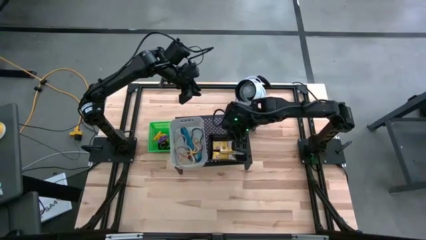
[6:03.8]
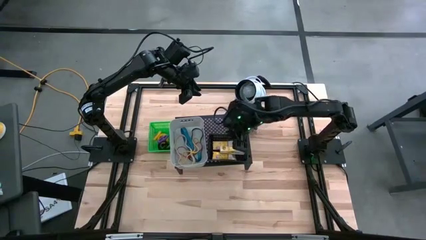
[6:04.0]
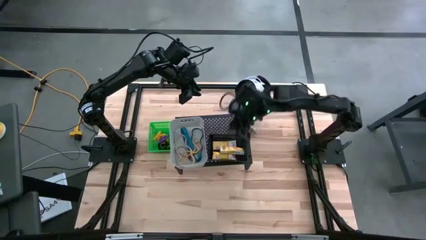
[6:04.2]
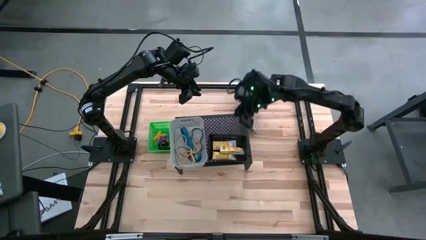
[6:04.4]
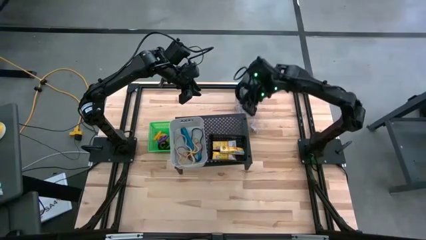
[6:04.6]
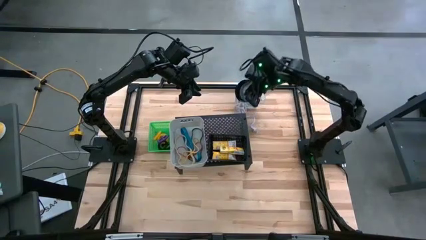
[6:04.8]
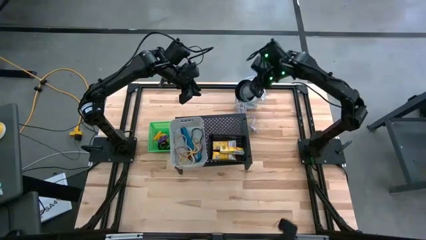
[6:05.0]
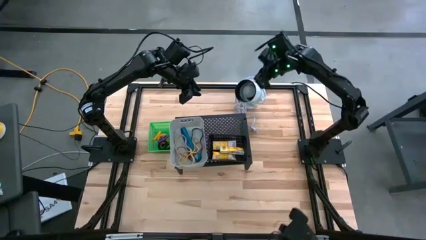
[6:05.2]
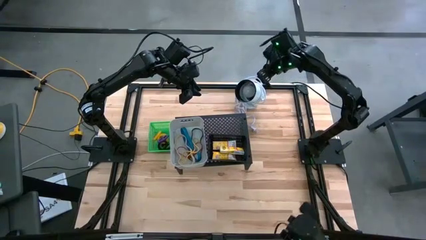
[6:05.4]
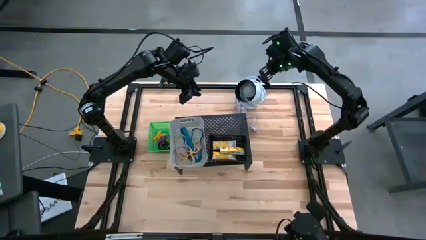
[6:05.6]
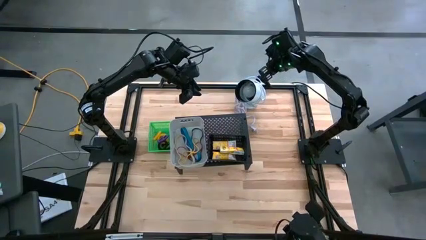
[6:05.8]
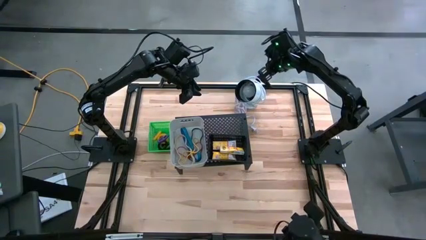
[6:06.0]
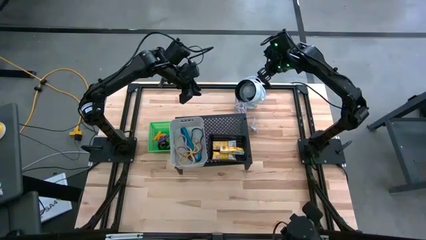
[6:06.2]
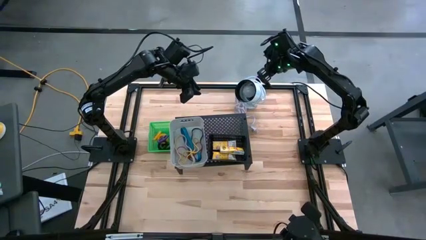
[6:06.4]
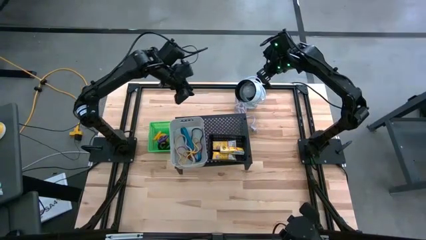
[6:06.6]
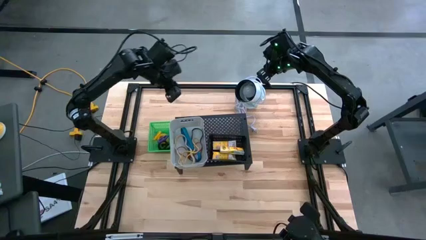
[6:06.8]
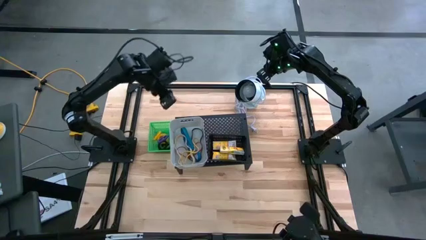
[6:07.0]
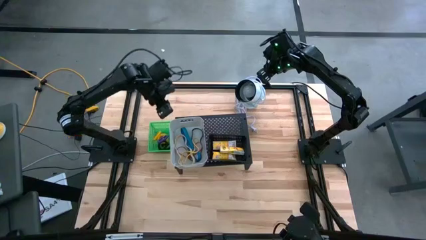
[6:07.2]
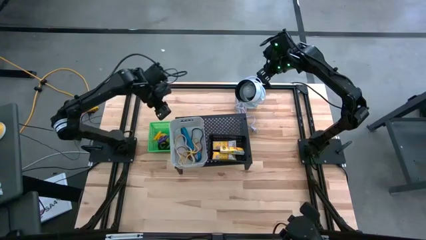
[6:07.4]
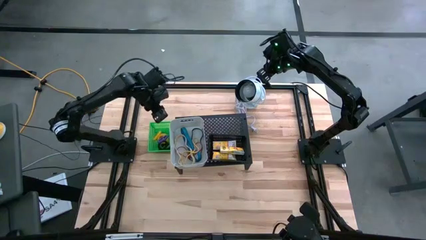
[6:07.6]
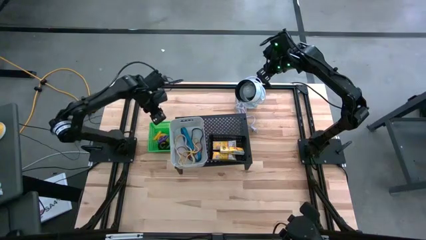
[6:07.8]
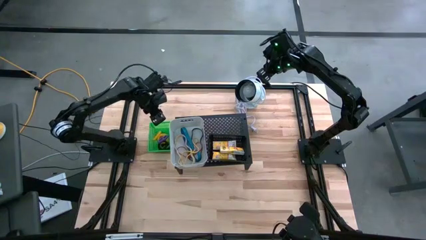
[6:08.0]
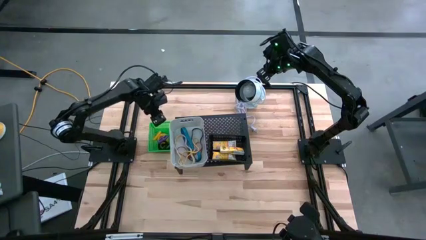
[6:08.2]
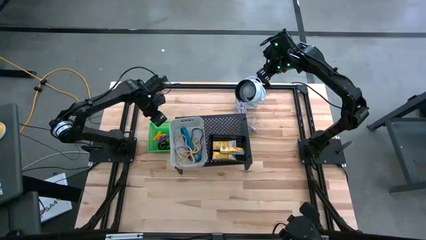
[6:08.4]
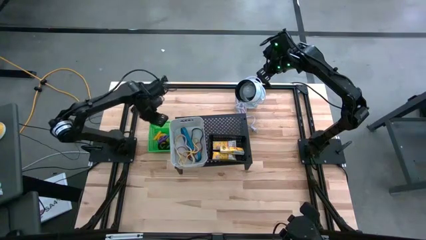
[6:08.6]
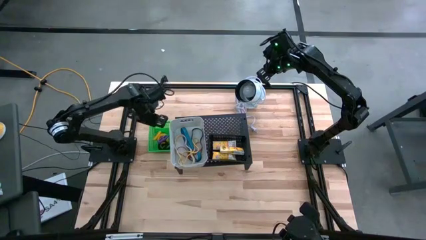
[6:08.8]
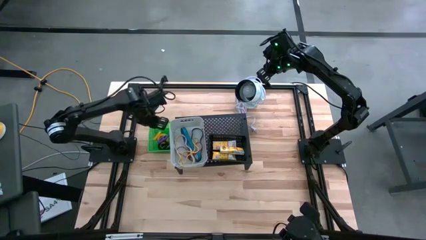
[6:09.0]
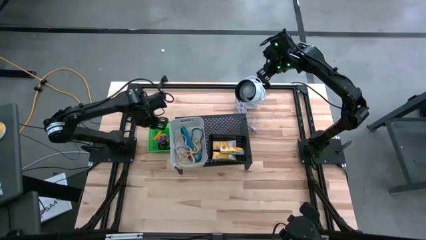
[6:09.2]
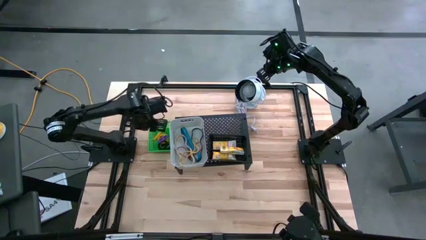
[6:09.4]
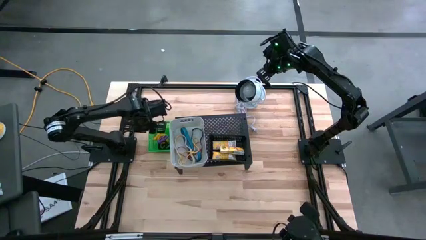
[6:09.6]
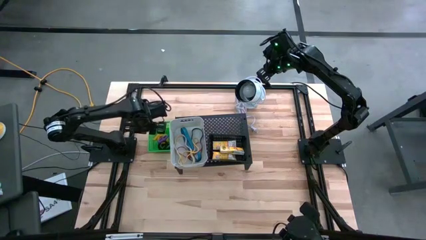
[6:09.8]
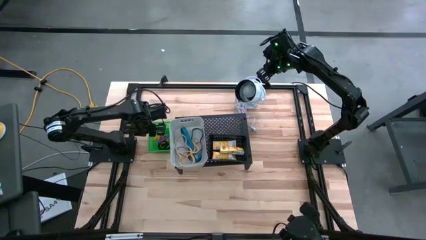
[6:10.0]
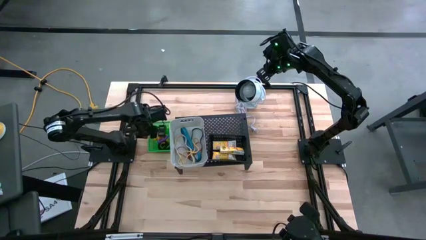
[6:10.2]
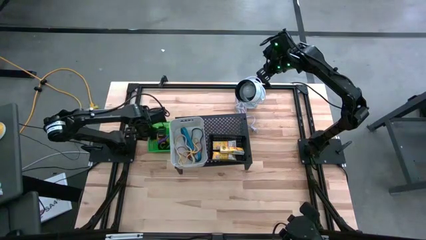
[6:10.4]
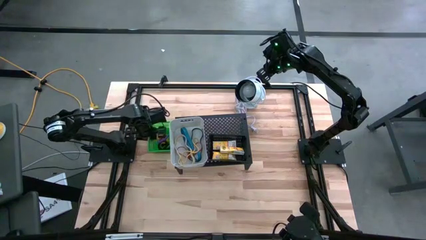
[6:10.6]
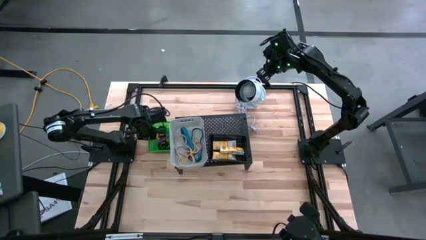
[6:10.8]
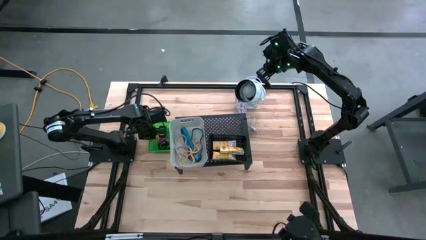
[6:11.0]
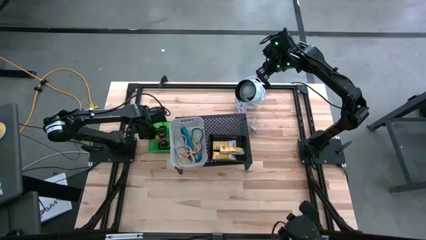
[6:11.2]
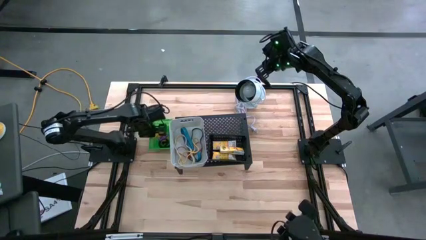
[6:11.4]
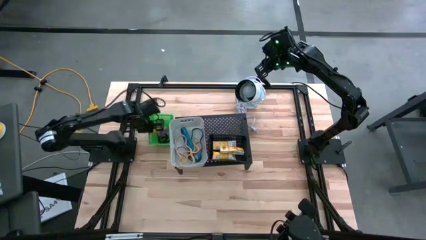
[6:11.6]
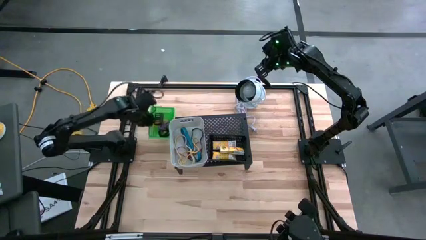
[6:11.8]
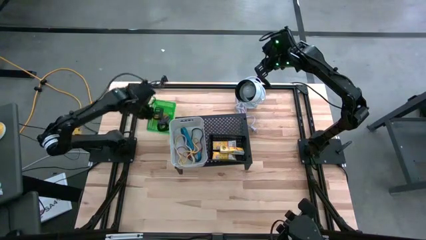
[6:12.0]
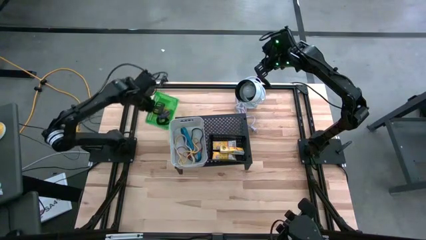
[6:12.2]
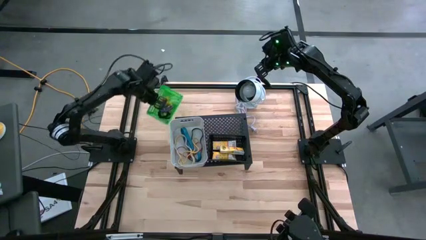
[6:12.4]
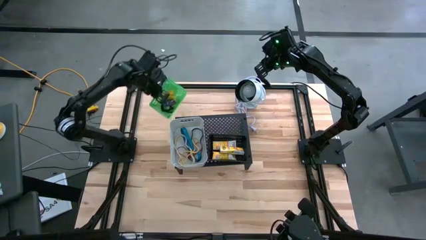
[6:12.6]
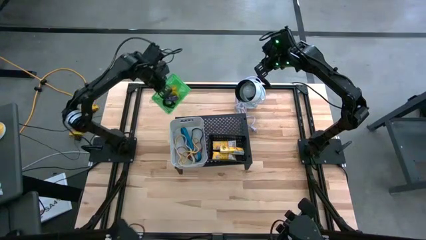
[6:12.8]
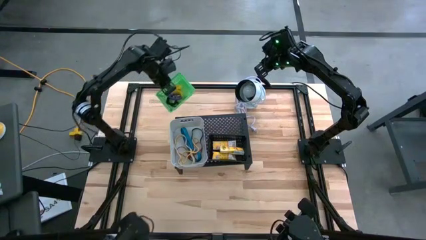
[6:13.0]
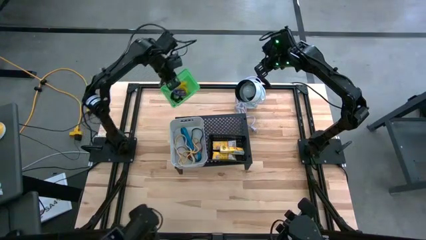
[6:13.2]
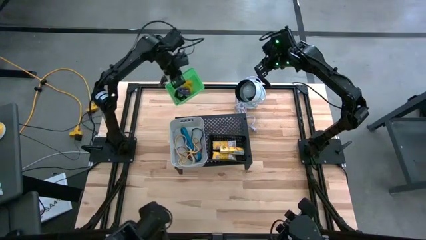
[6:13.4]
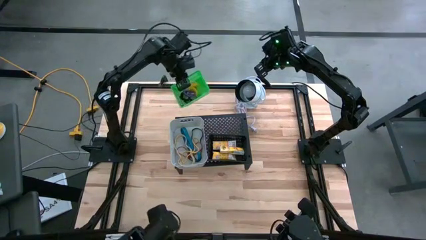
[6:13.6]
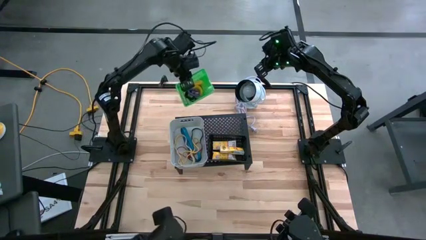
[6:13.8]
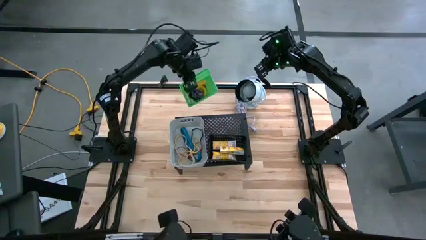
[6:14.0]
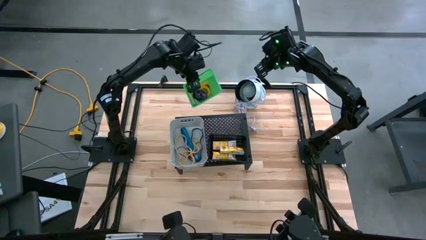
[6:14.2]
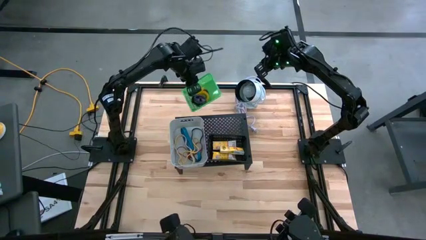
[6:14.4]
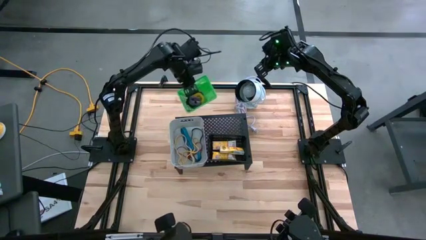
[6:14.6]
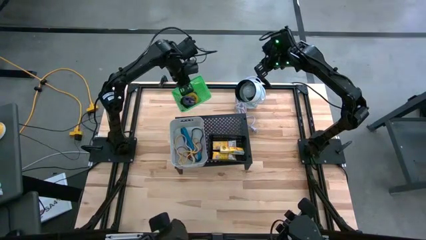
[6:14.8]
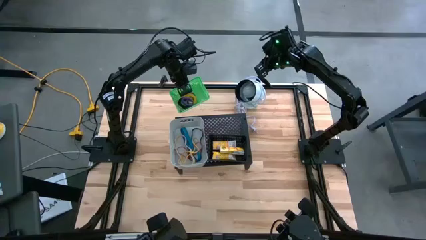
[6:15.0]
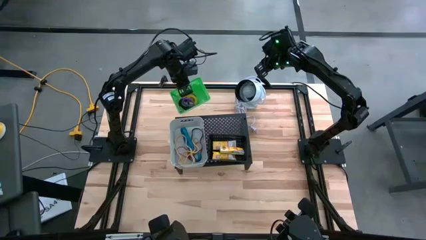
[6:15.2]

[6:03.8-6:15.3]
Task: Pick & Place Office Desk Supplies
Put the green bin with the spring keychain on the shelf

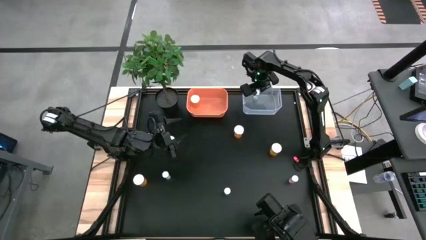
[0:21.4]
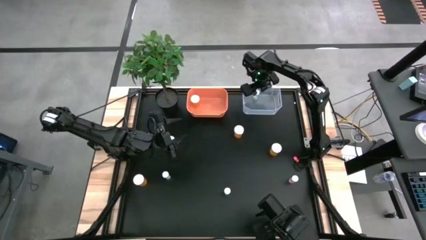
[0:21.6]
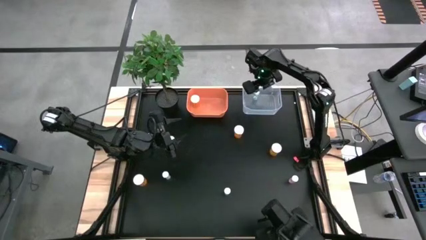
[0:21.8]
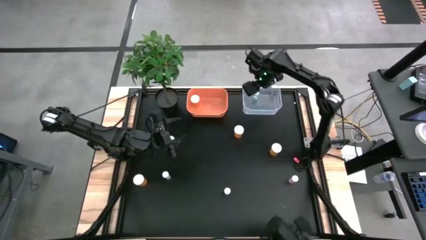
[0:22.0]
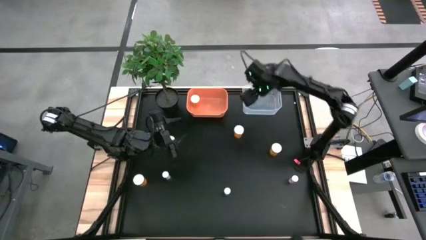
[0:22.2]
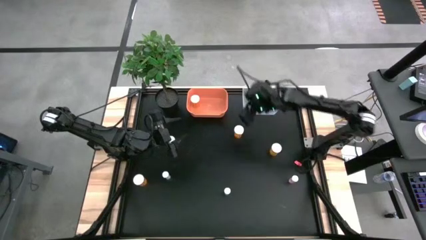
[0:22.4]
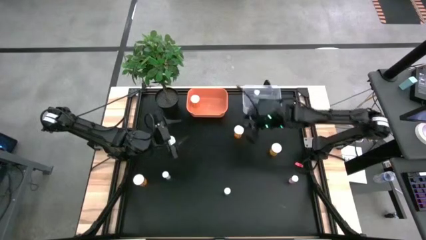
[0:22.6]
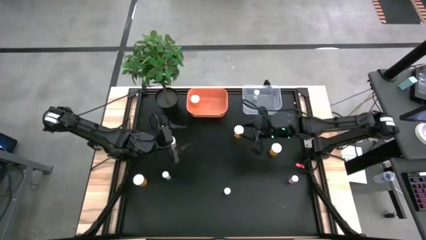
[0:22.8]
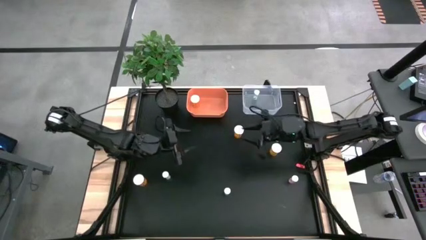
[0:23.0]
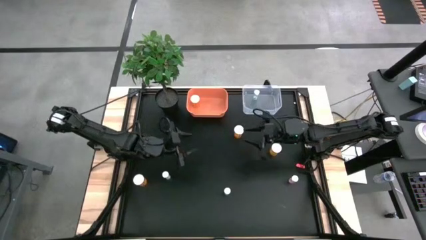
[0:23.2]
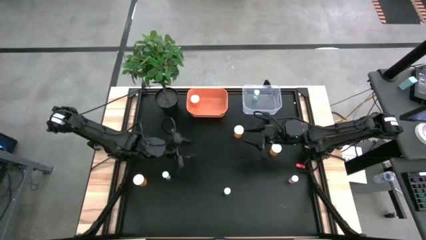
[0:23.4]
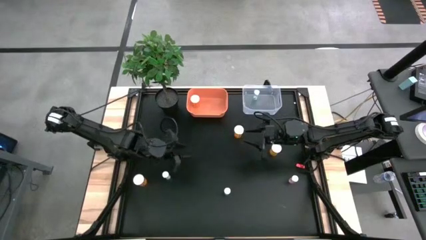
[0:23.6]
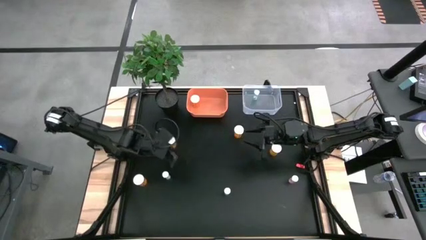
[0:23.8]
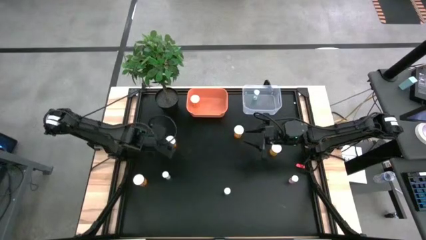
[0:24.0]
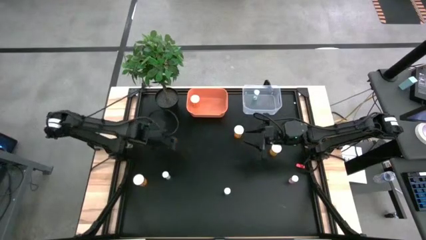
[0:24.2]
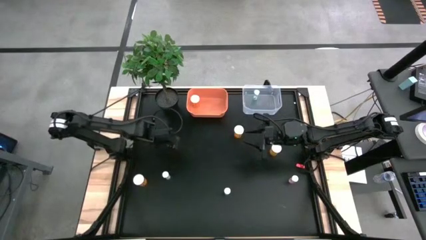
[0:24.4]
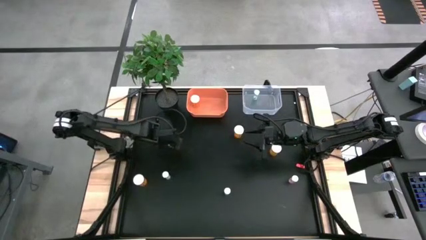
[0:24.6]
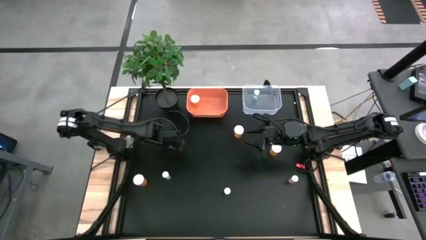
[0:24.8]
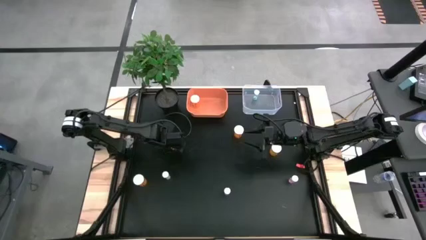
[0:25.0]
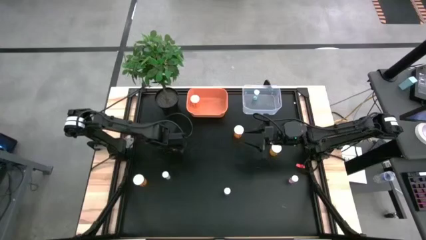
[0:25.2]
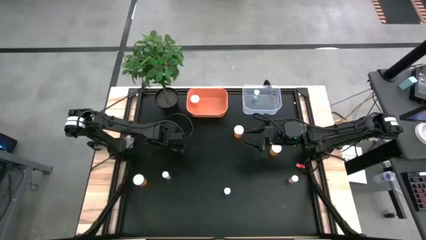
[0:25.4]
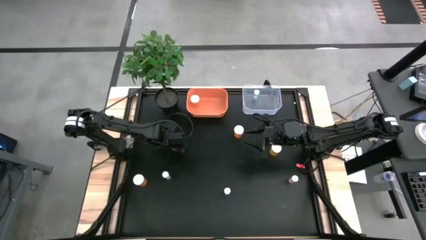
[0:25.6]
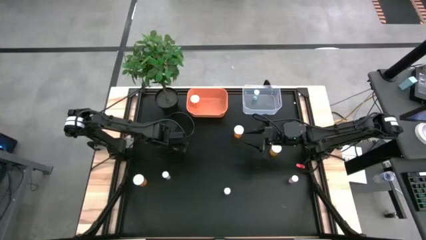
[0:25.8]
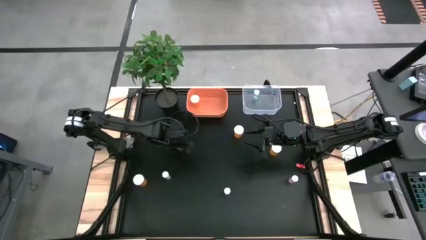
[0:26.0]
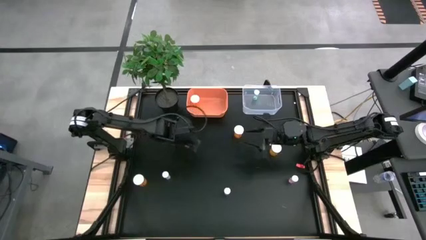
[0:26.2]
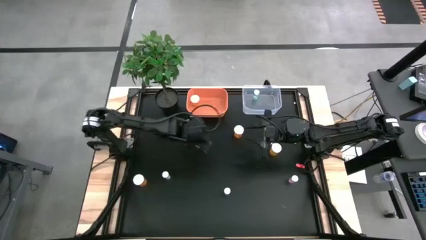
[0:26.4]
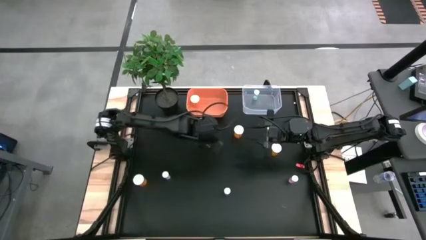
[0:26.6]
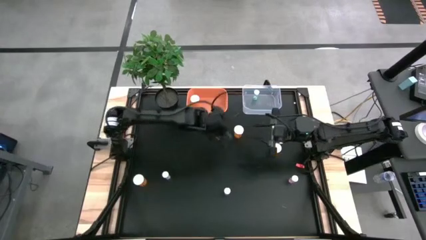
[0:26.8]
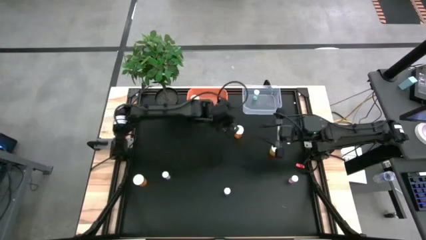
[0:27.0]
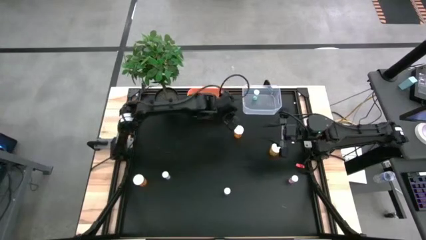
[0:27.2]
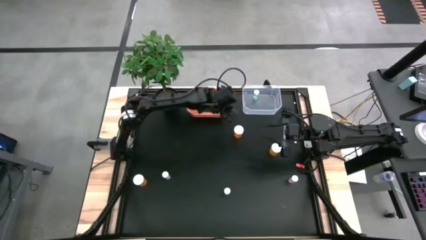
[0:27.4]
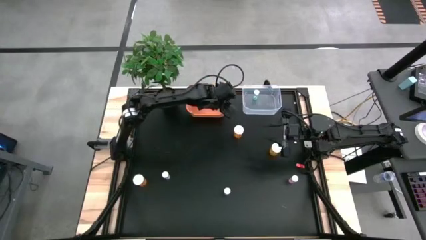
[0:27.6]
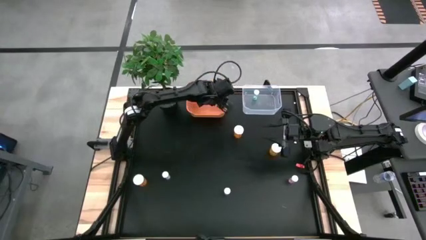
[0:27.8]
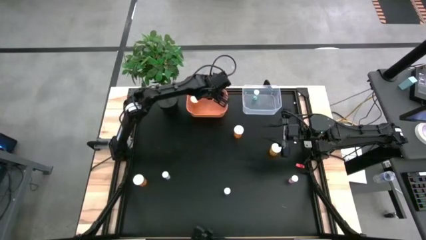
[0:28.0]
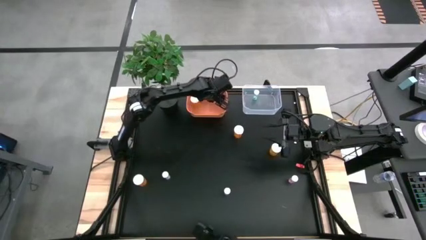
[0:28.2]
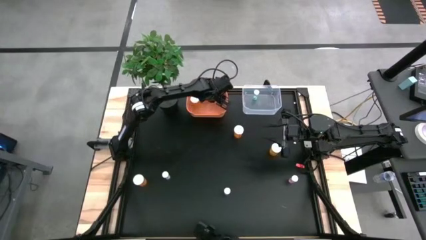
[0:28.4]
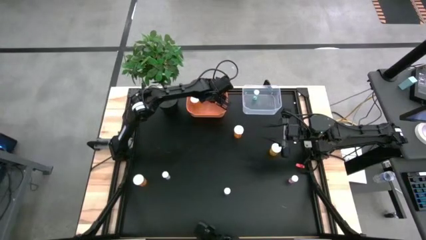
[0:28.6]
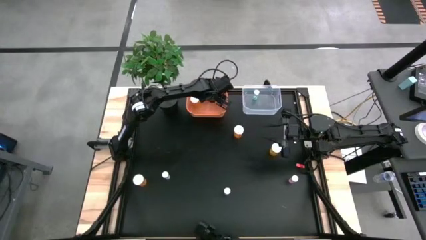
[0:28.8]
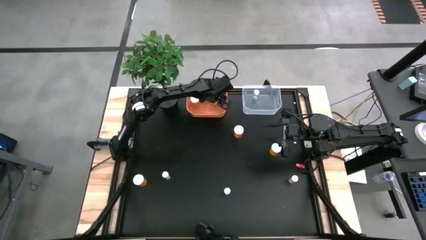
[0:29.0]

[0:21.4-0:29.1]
Task: Pick and place medicine bottles into bin by pill shape (circle, oval)
Put the orange pill bottle into the orange bin
